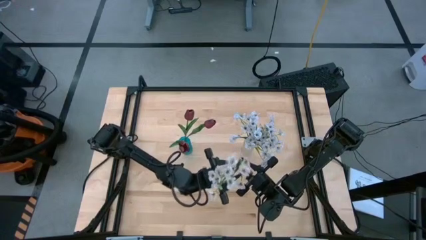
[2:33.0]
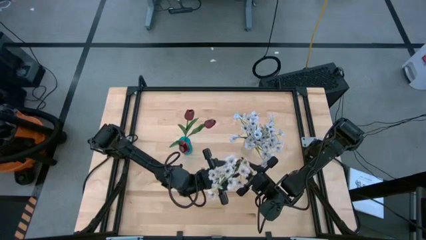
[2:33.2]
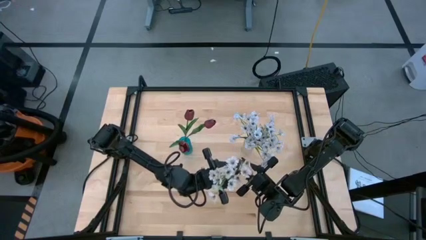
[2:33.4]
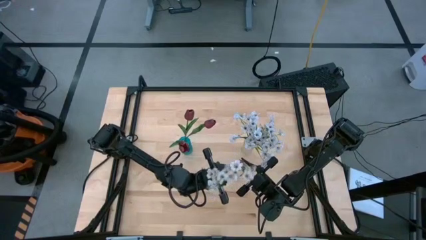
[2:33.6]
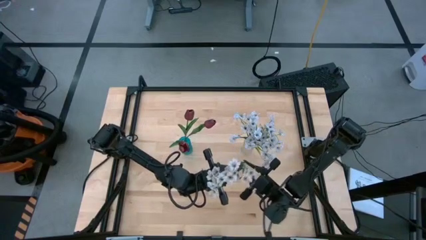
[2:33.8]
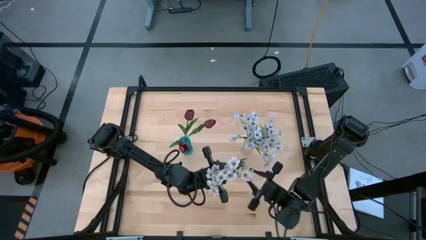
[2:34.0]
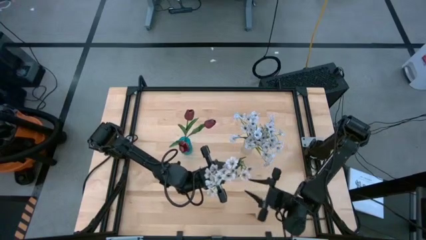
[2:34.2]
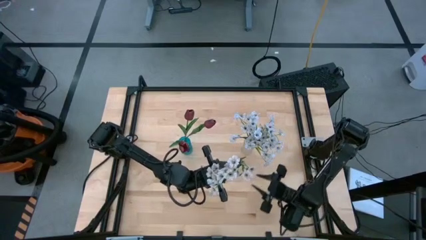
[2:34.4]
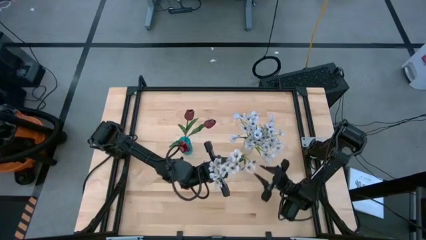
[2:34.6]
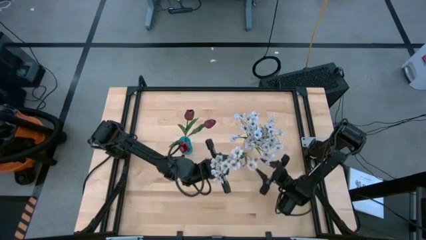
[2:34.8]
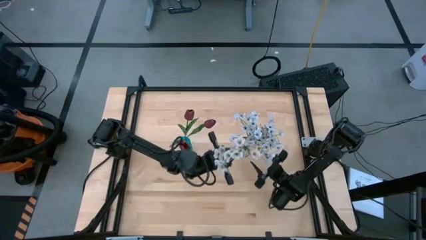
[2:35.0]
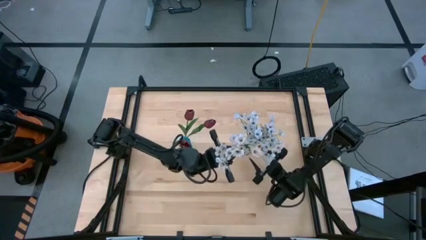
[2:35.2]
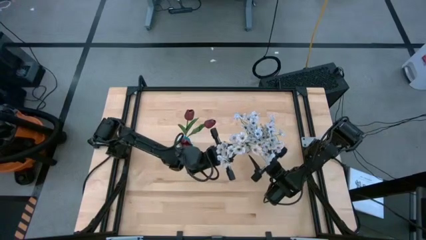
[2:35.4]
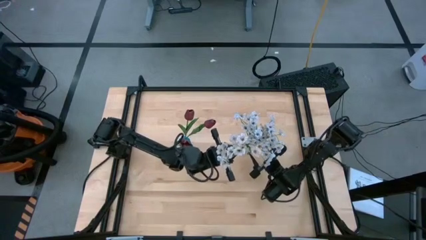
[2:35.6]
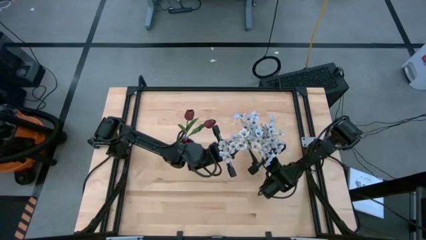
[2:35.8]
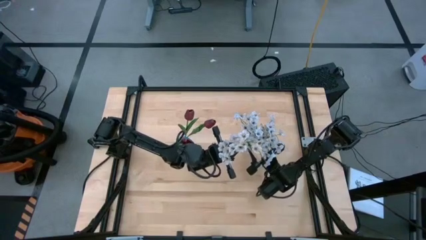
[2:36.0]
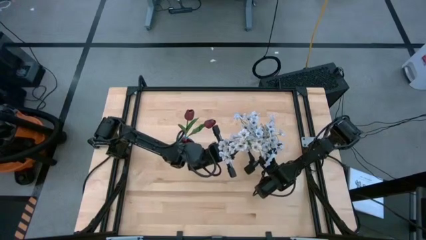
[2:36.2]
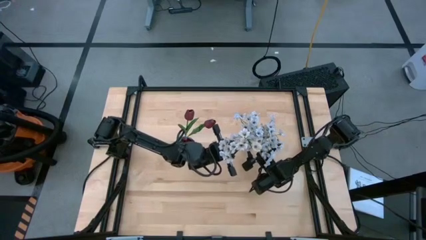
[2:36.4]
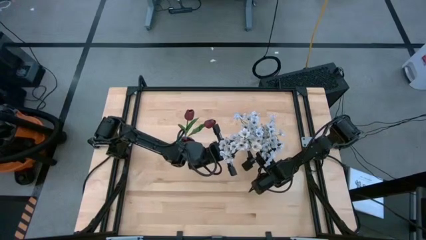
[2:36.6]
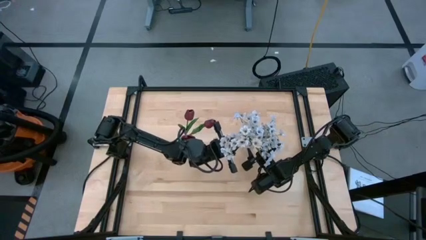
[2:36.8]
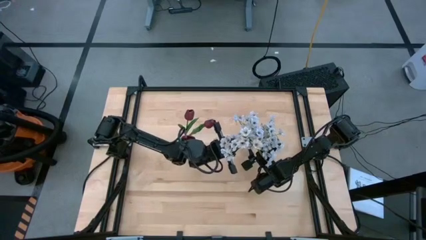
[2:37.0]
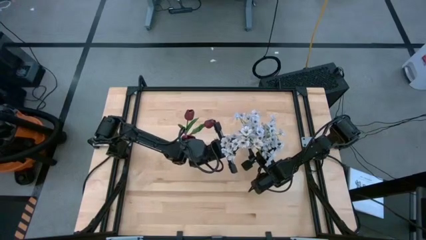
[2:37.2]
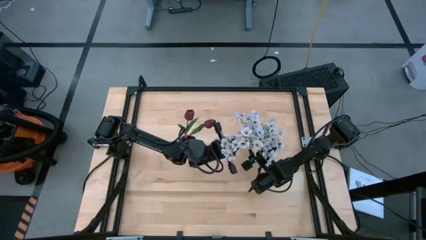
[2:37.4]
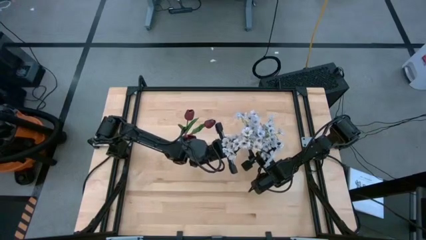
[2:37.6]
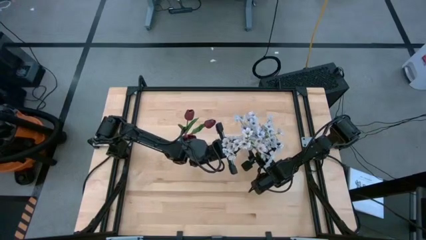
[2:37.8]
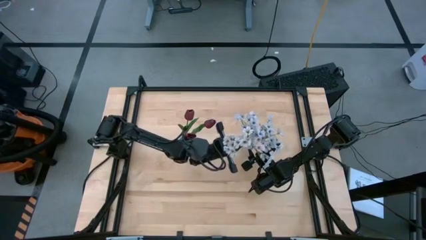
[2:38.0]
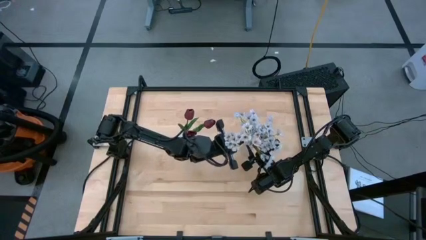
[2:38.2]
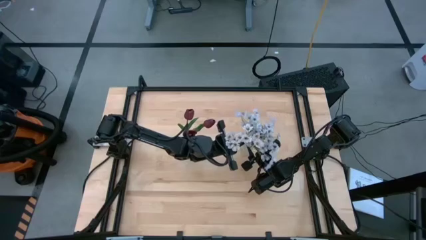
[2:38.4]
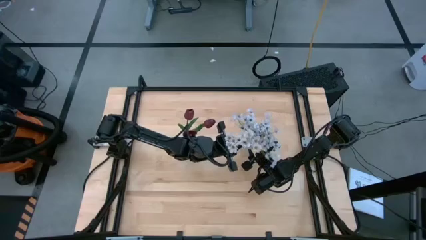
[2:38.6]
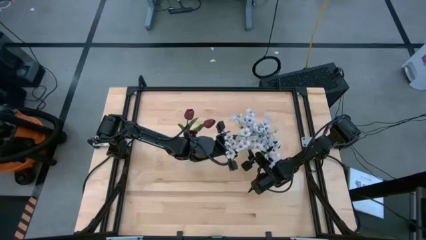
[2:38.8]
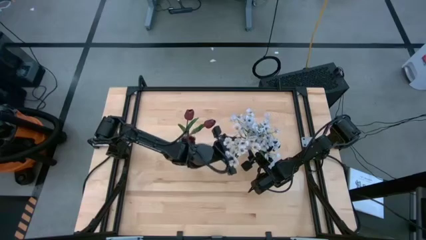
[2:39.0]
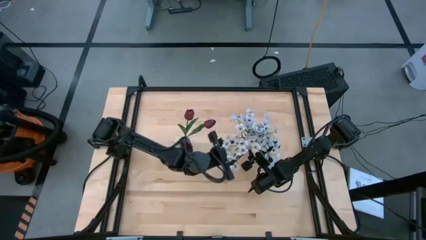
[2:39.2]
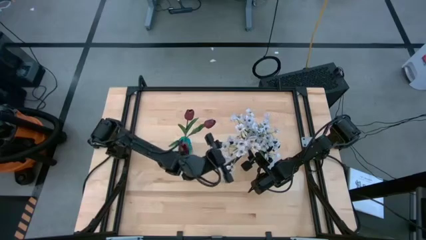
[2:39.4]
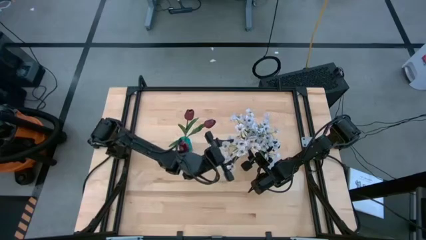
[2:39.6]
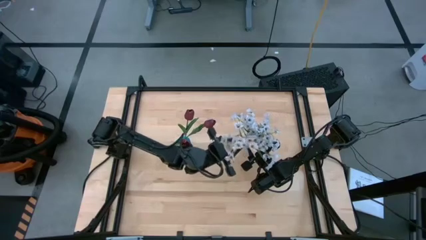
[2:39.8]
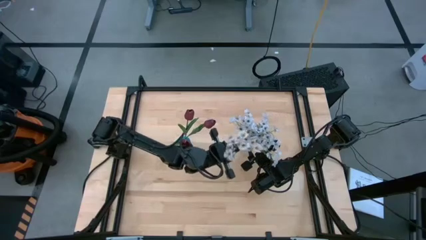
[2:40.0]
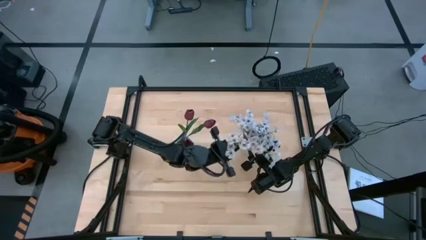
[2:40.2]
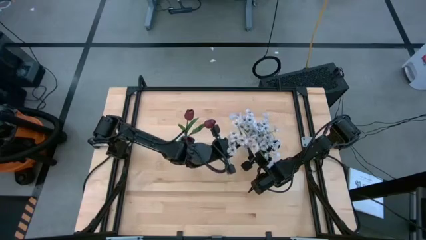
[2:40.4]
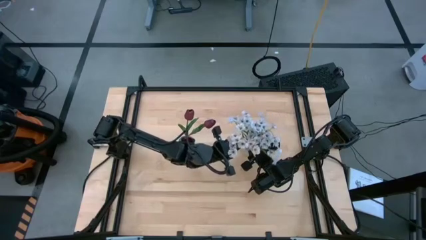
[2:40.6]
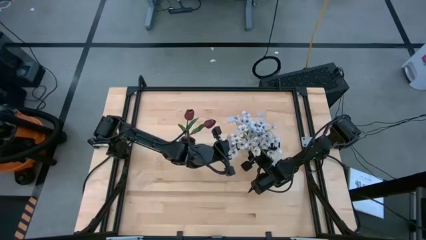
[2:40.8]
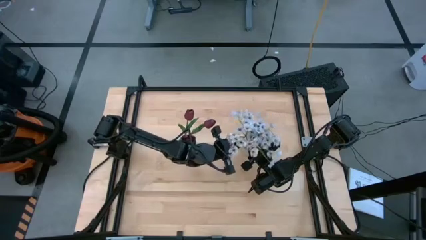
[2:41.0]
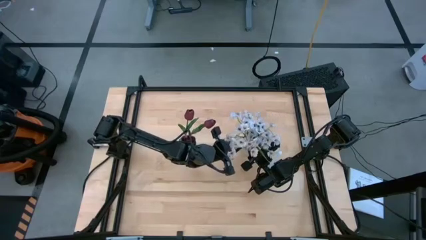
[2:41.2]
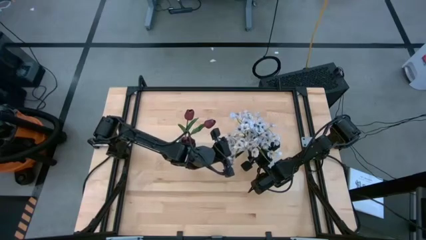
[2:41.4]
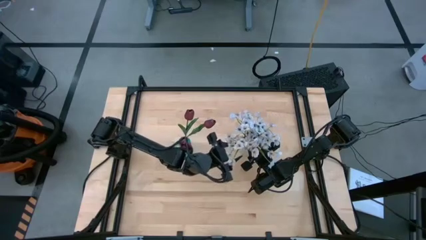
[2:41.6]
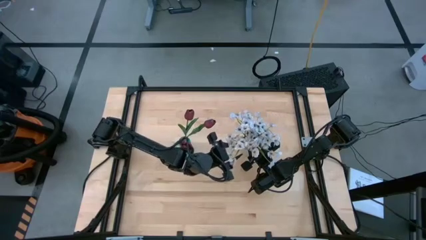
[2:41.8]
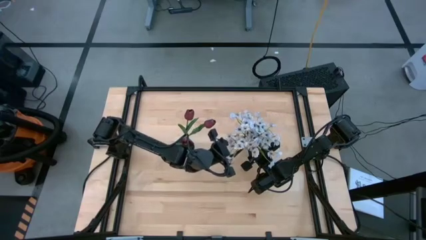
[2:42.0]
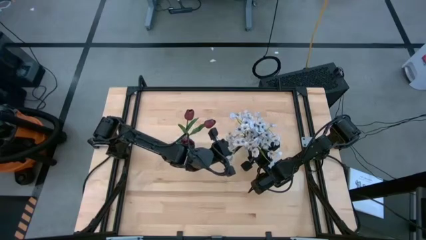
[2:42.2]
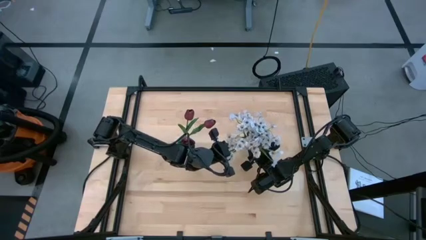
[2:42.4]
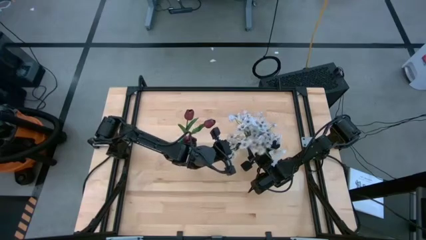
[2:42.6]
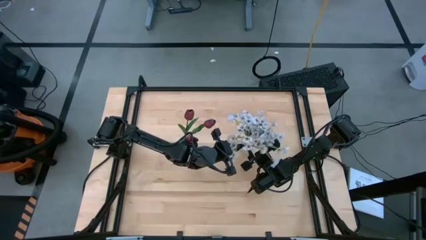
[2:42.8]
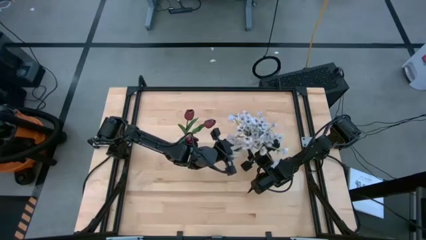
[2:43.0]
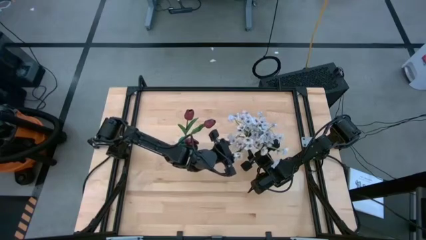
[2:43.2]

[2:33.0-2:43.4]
Task: Sort flowers into vase by color
Put the white daisies into the transparent vase

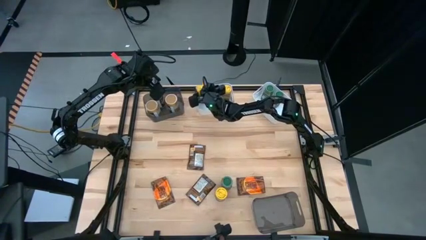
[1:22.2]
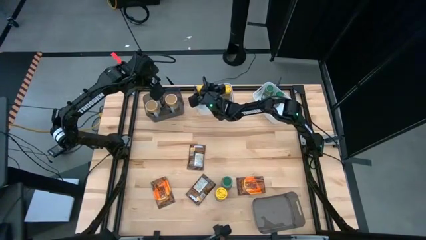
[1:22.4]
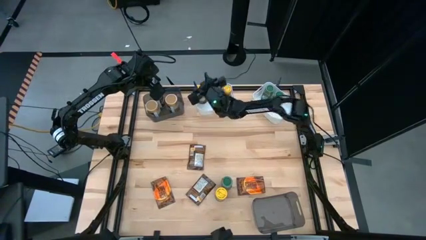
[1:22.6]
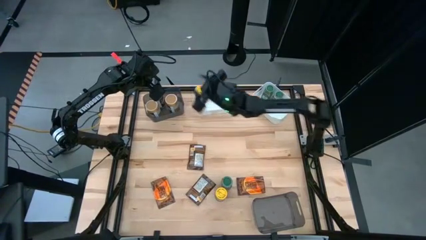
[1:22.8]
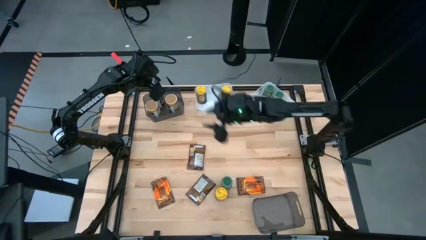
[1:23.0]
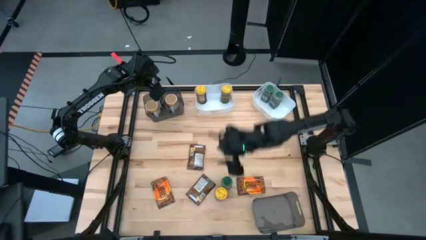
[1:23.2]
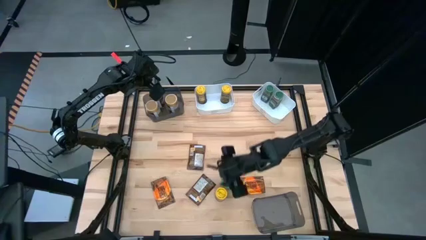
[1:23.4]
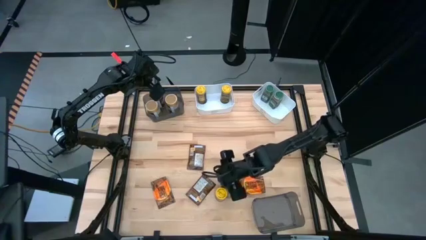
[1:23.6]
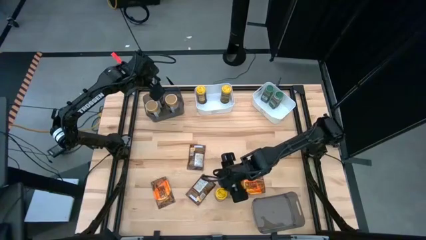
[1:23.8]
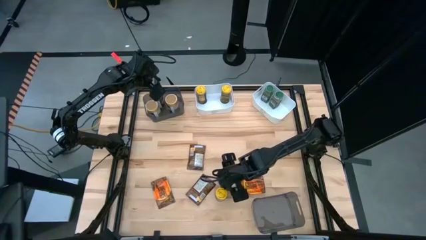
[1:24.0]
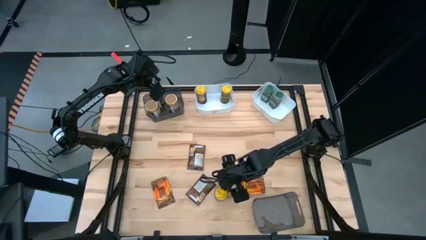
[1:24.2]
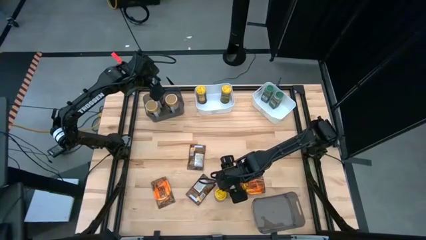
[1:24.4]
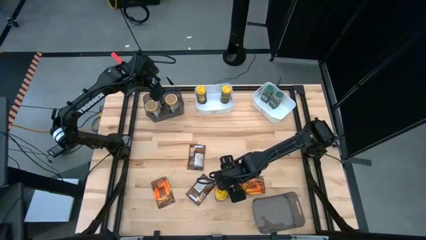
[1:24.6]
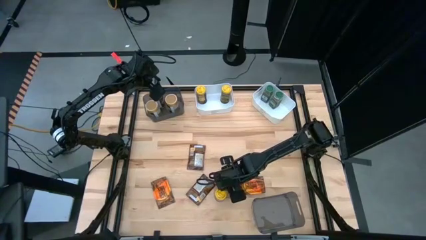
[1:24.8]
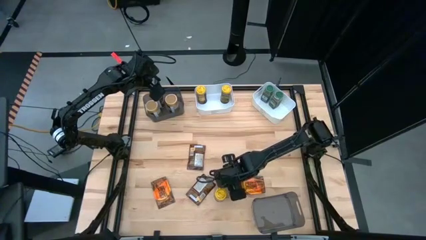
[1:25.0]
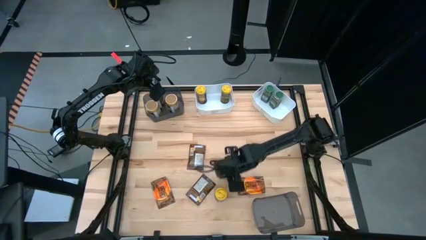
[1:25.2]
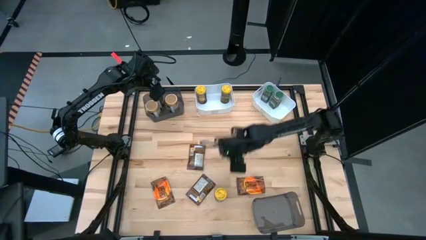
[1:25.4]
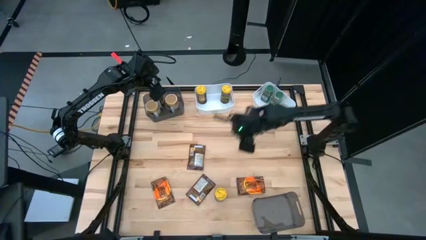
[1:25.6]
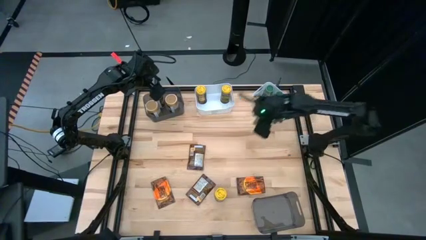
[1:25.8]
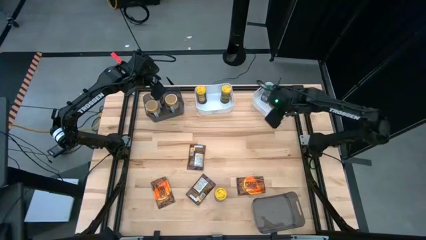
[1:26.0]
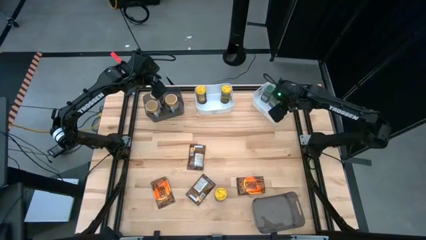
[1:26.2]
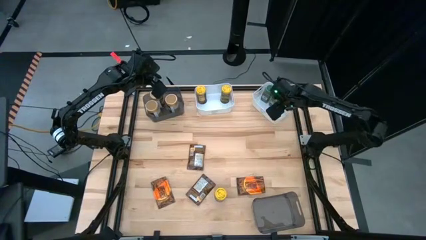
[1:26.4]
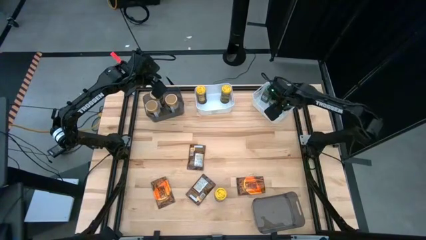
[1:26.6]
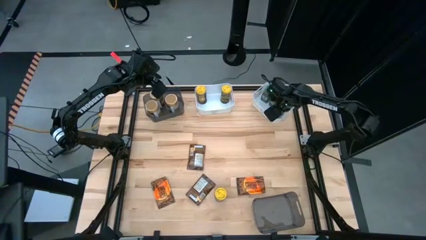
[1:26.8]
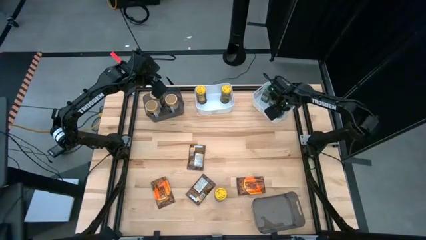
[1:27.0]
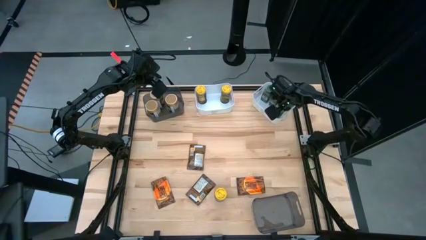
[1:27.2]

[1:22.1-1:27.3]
Task: Sort spices by type
Put the green seasoning bottle into the right white bin
